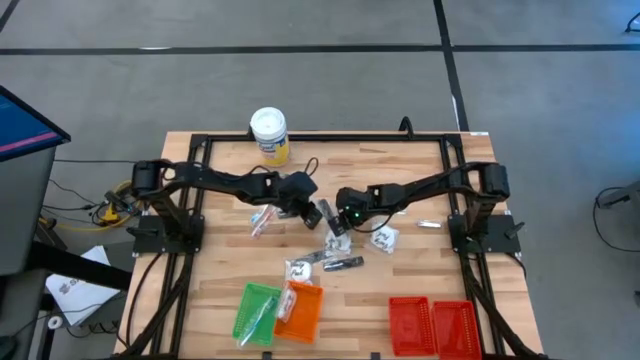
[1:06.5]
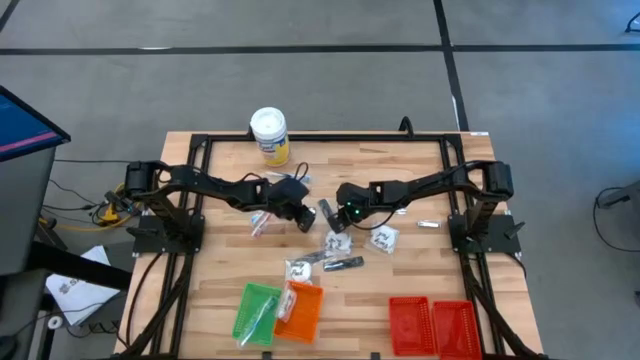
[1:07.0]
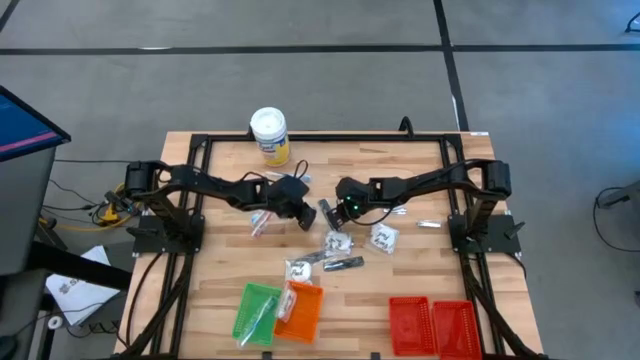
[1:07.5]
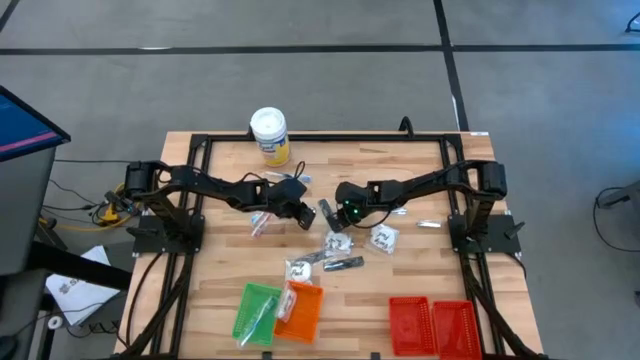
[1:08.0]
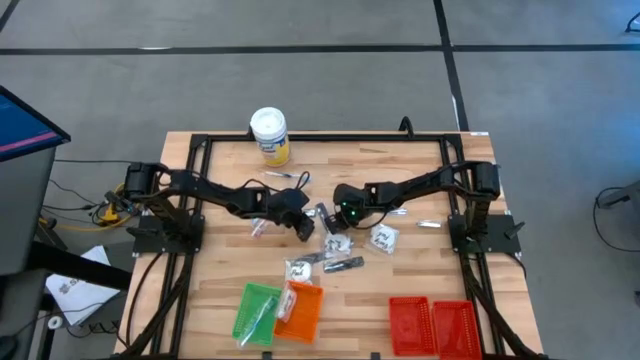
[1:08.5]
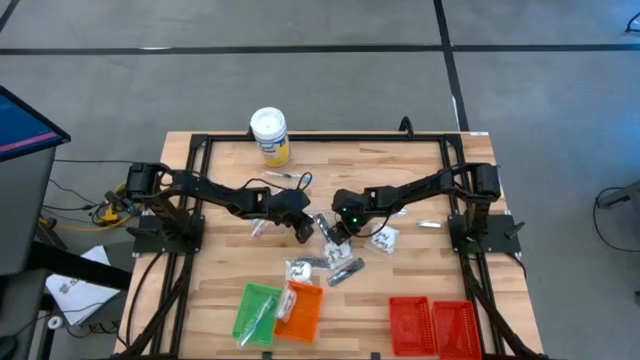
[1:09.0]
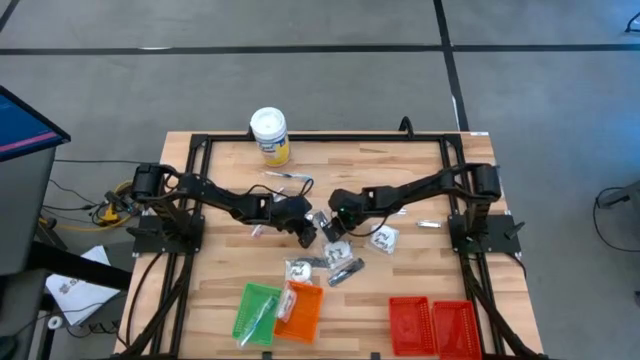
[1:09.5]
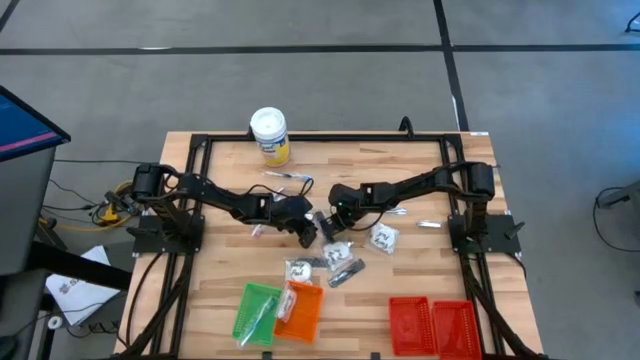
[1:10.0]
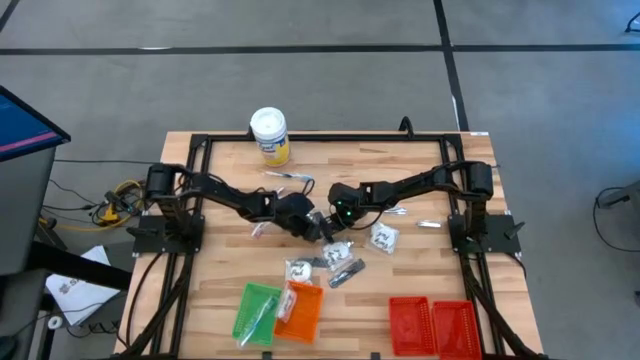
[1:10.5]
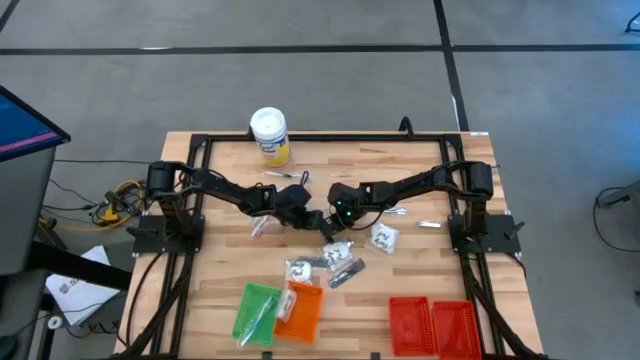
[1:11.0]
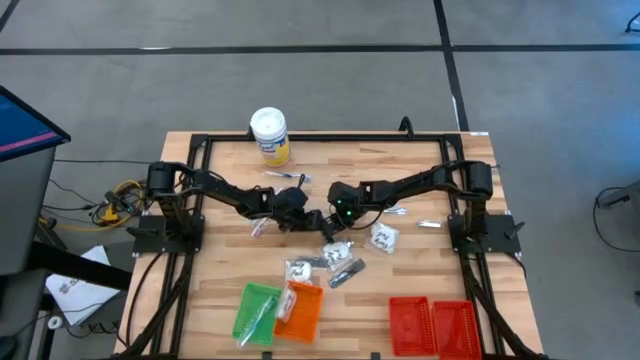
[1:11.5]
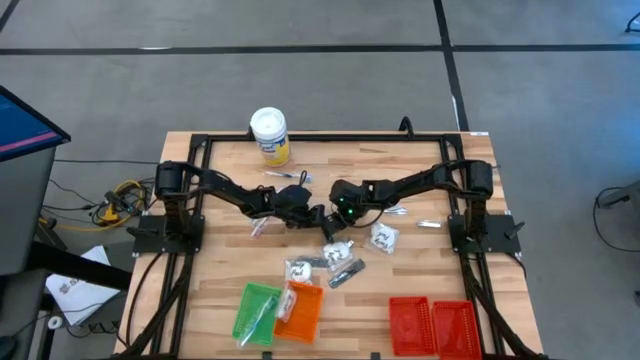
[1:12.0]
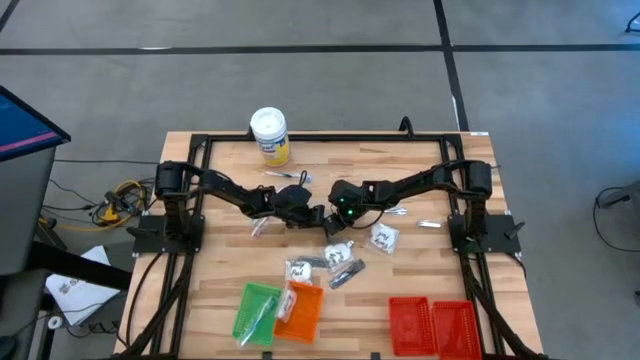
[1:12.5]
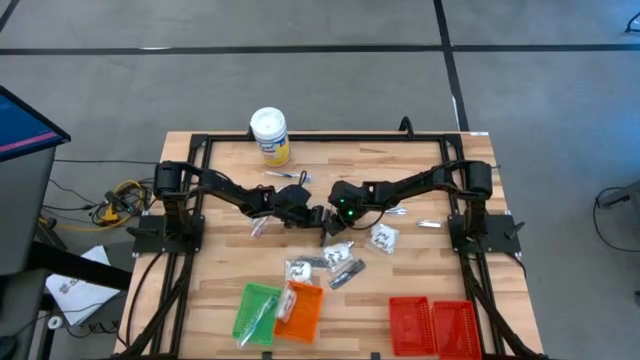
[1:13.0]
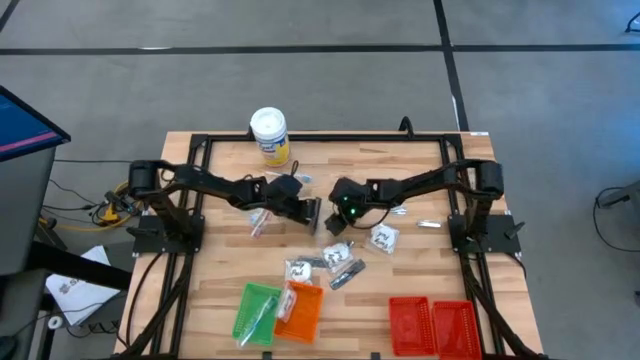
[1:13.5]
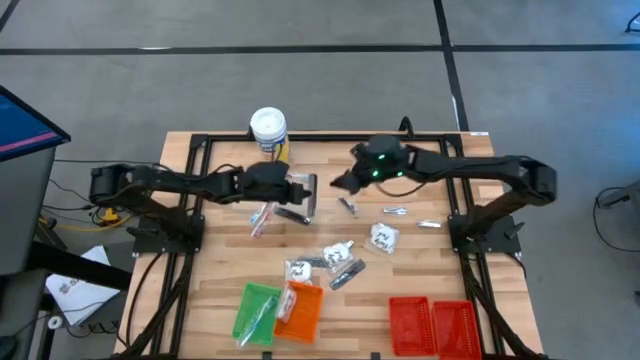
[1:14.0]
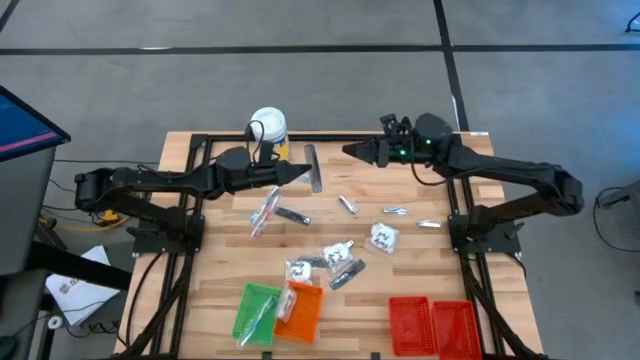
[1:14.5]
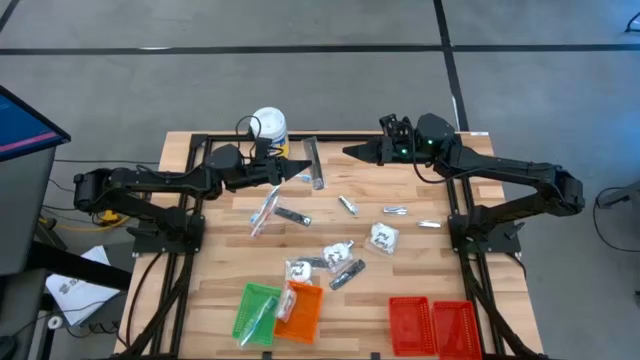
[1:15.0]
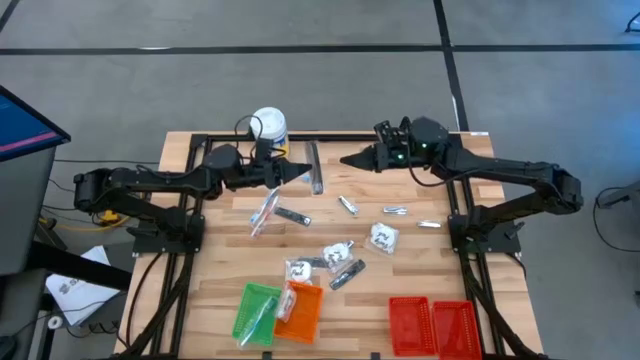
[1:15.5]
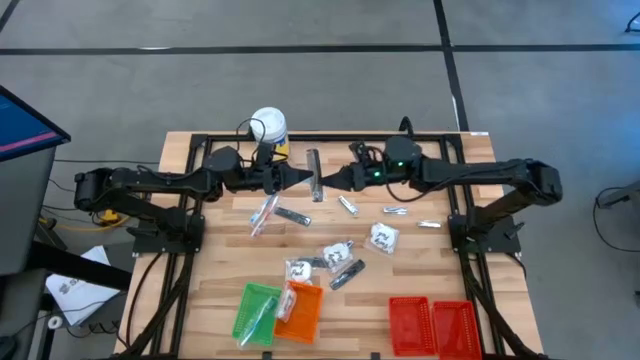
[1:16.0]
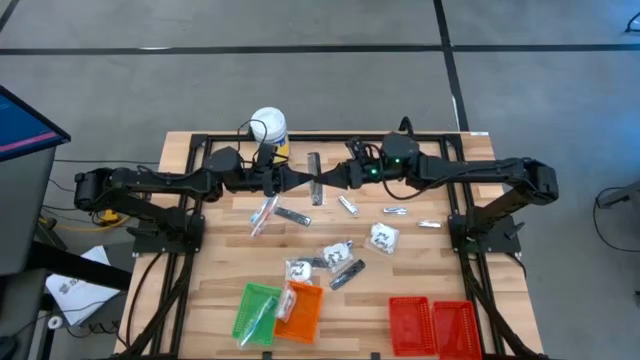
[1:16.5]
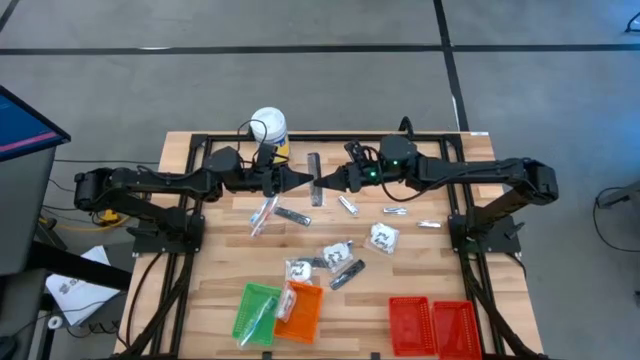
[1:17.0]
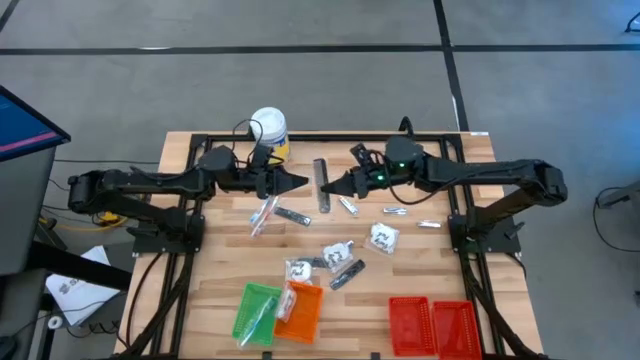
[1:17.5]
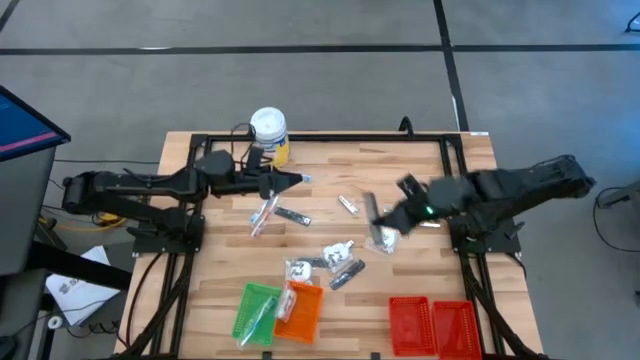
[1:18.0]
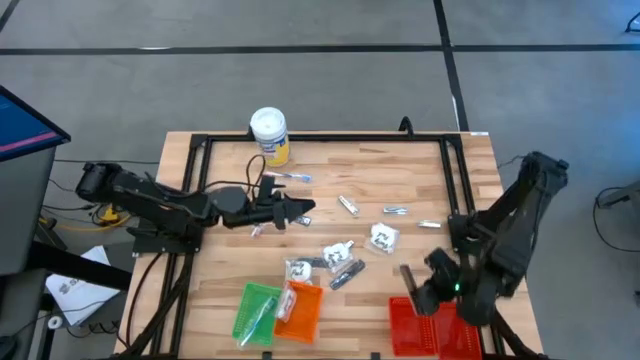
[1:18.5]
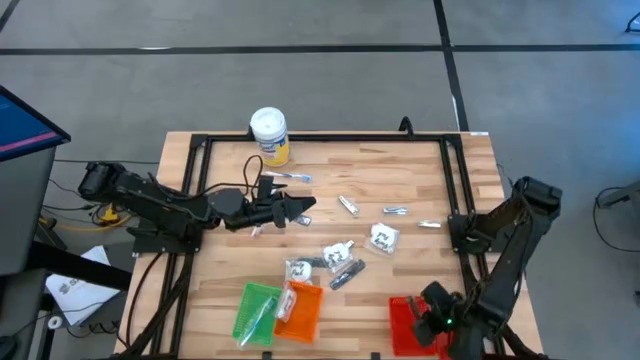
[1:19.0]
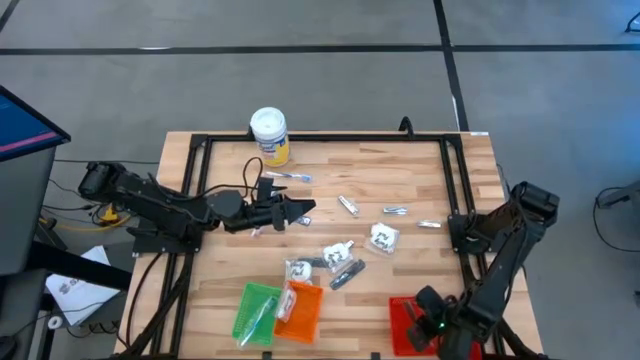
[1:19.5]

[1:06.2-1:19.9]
Task: Pick & Place Travel size toiletries
Put the black comb into the left red basket

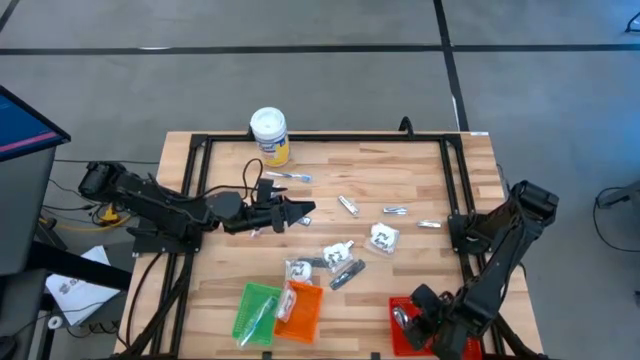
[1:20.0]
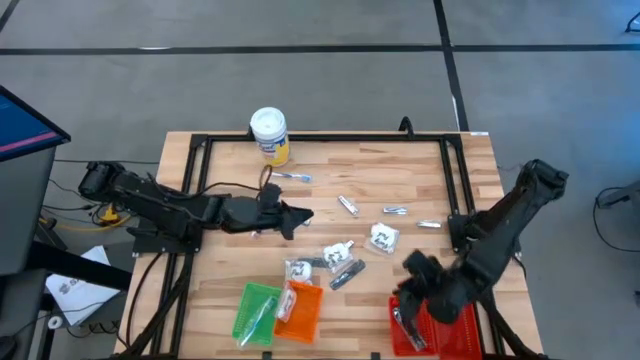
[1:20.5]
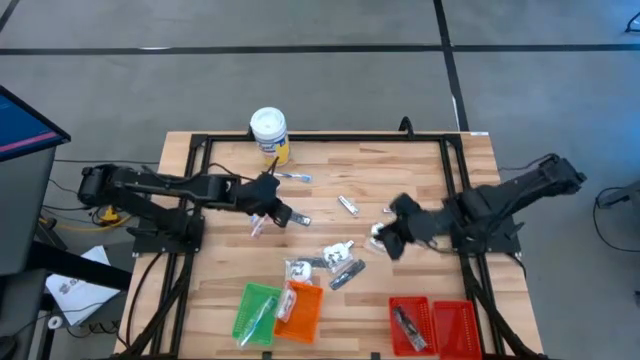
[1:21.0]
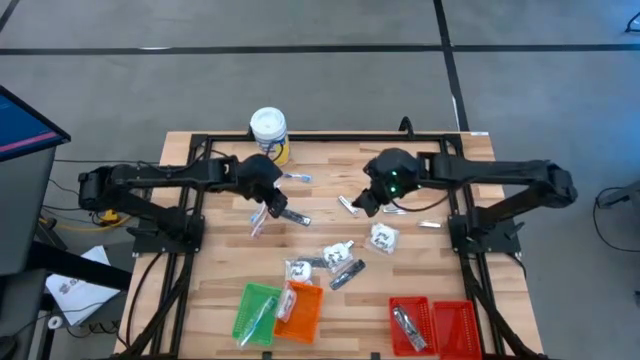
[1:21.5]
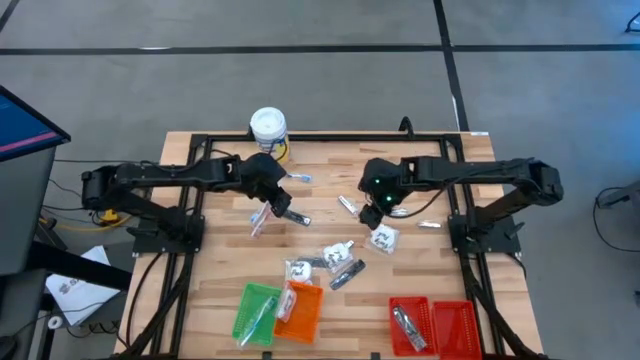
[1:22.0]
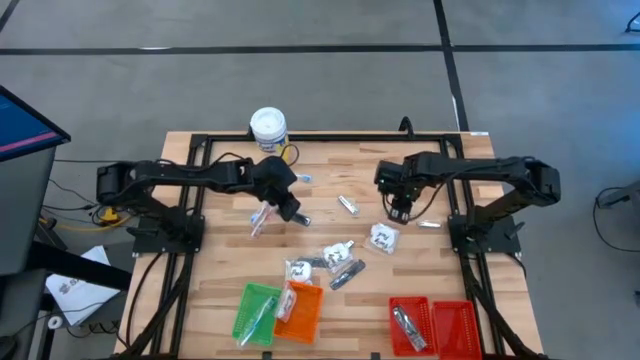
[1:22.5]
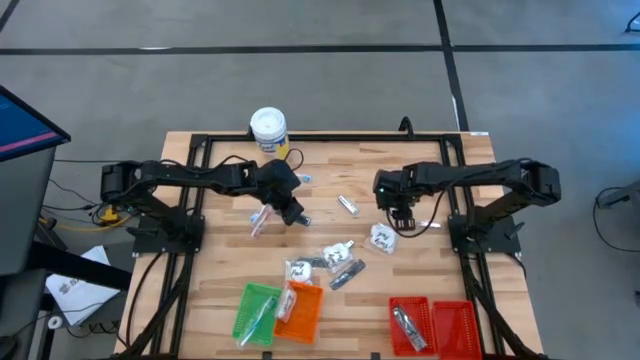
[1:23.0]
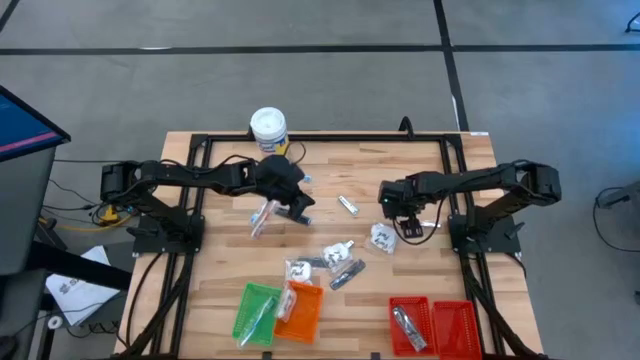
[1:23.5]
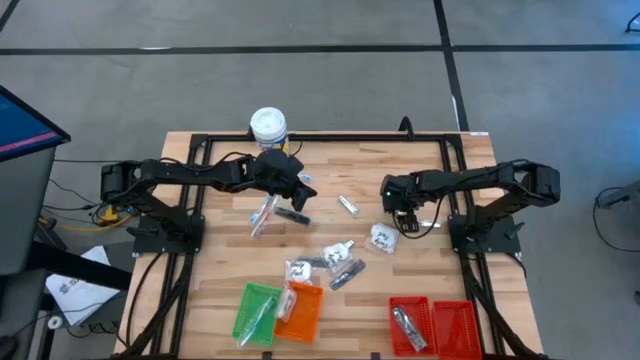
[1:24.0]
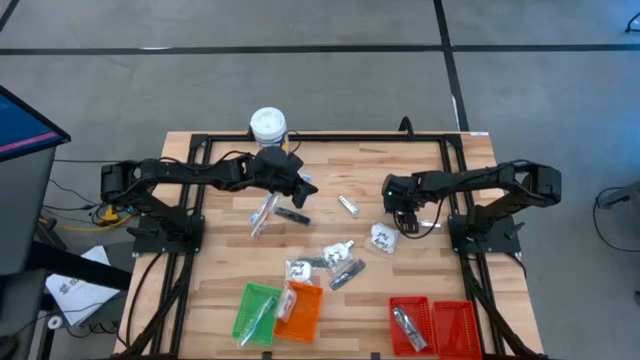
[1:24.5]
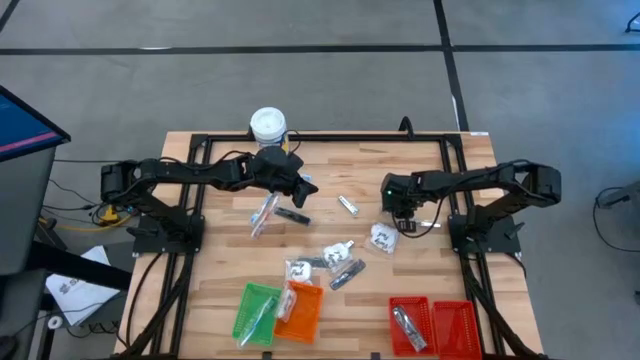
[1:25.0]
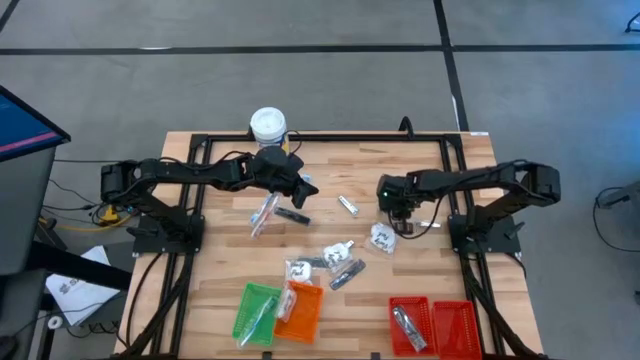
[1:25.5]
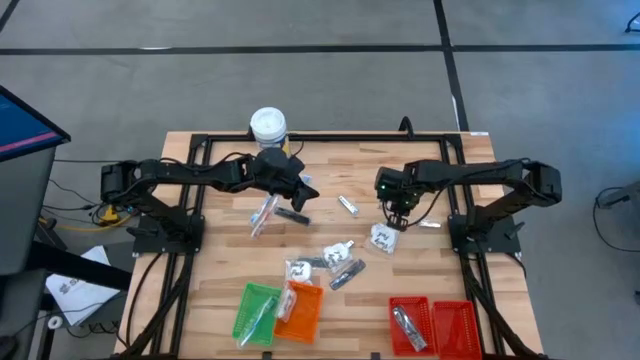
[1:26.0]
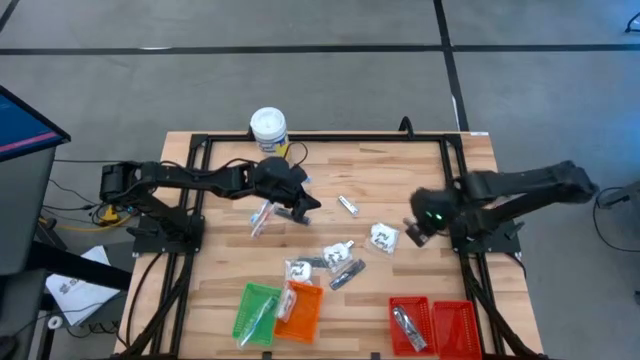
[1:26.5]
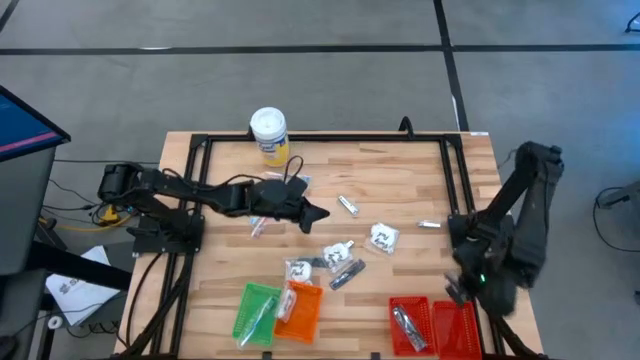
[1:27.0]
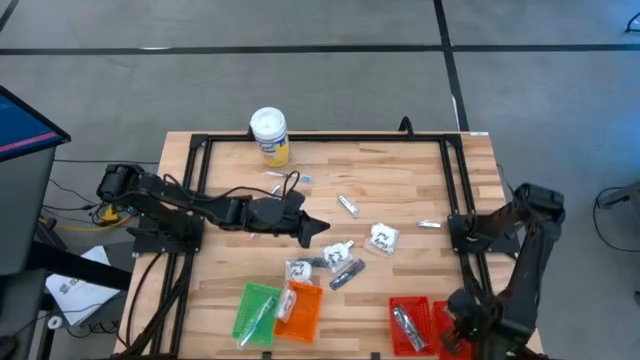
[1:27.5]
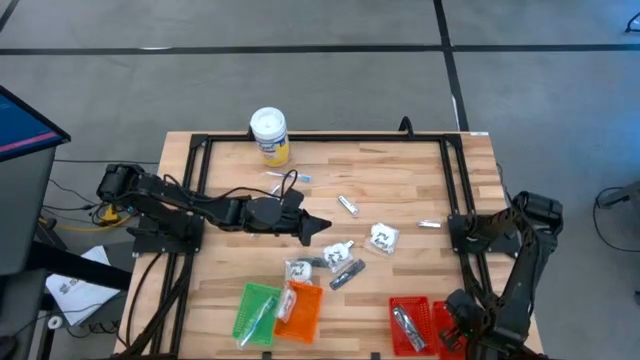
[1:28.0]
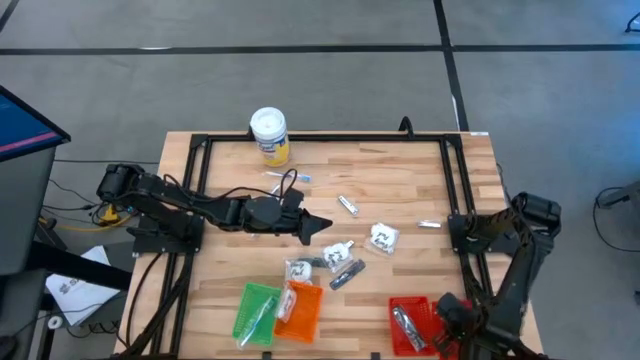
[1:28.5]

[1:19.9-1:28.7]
Put the silver nail cutter into the right red basket
